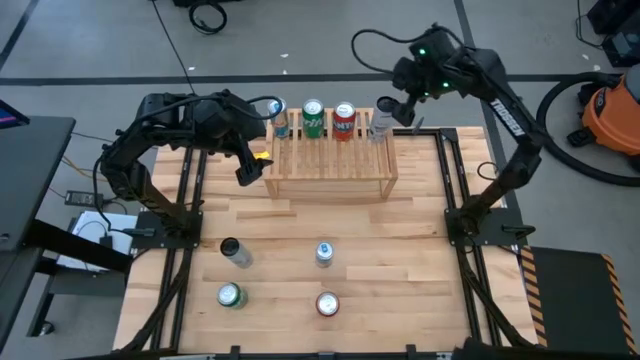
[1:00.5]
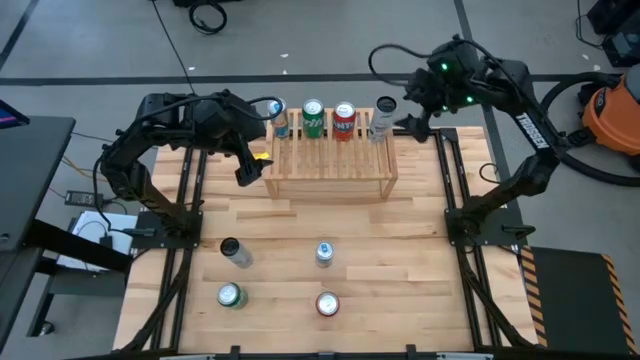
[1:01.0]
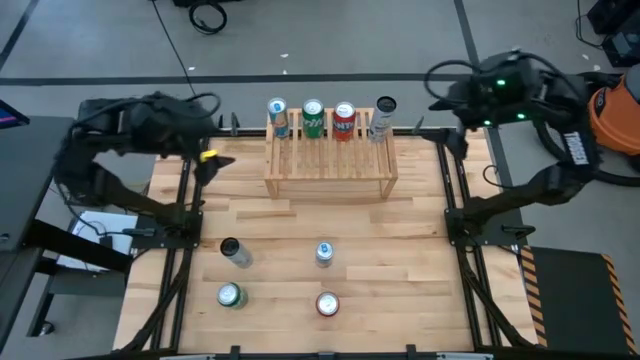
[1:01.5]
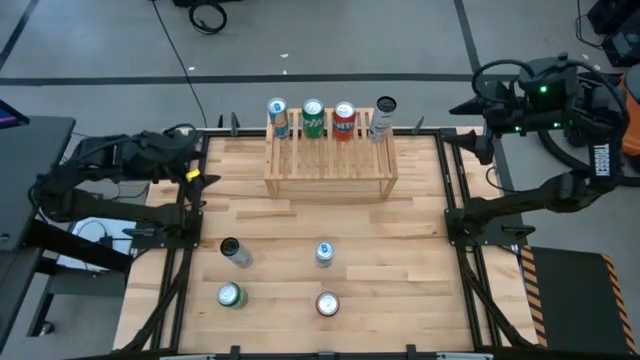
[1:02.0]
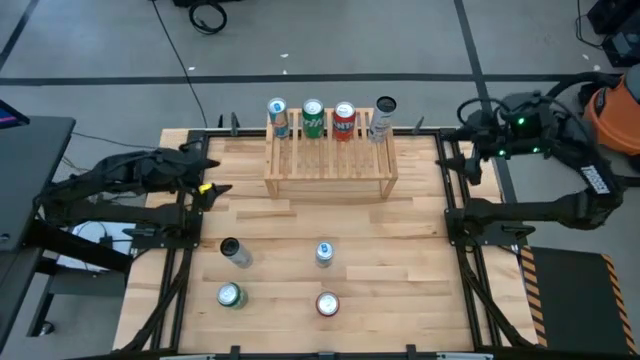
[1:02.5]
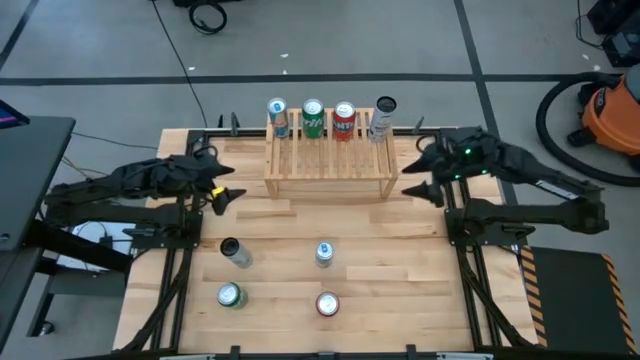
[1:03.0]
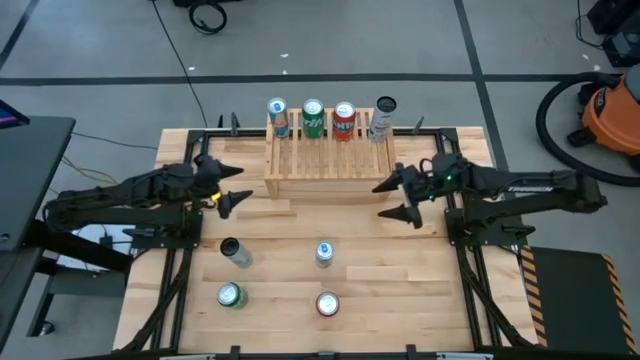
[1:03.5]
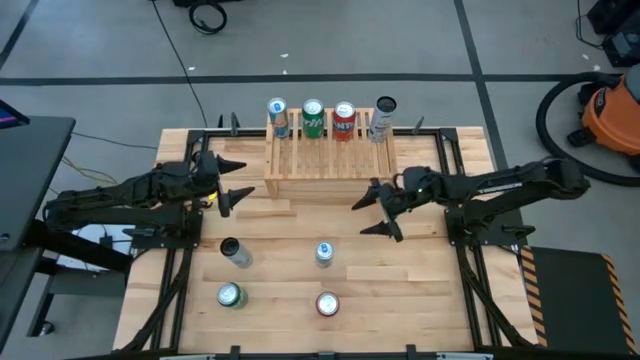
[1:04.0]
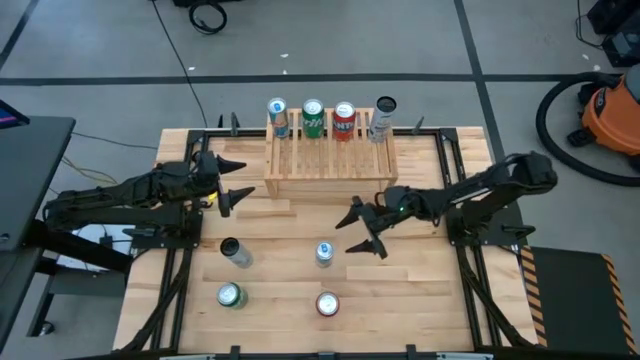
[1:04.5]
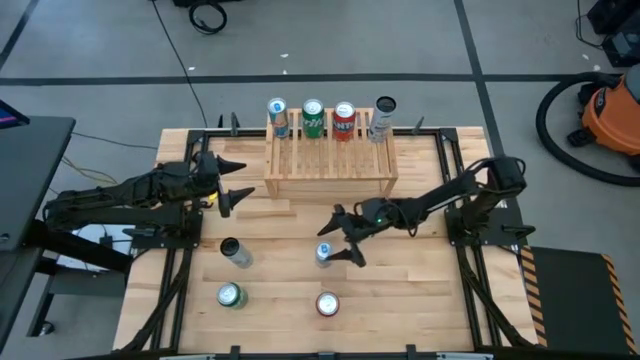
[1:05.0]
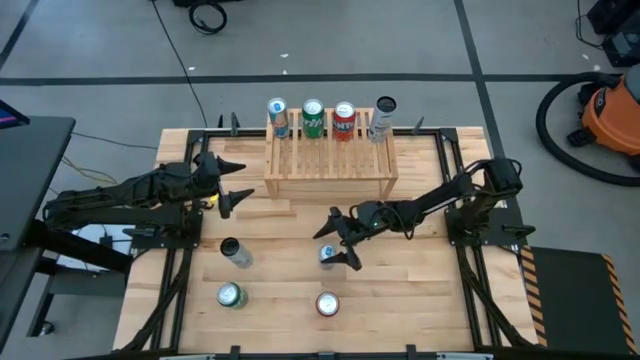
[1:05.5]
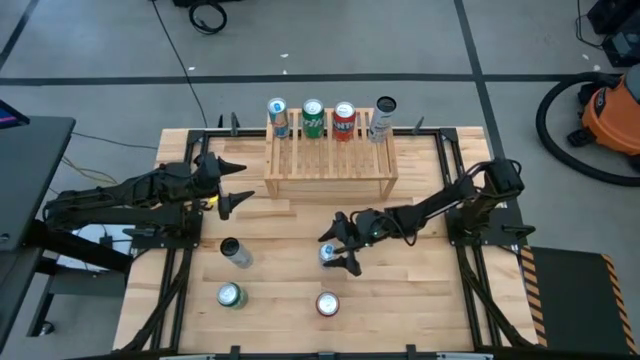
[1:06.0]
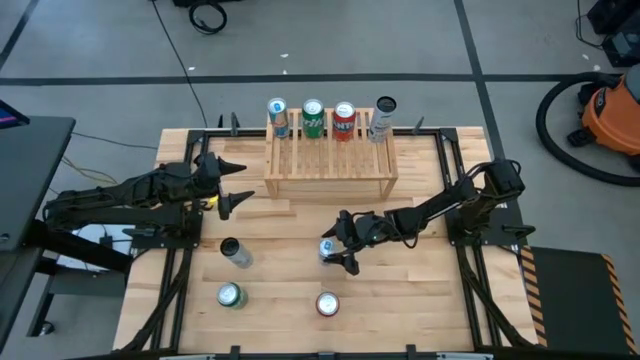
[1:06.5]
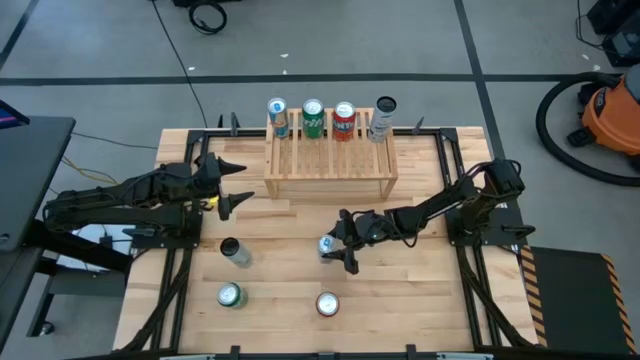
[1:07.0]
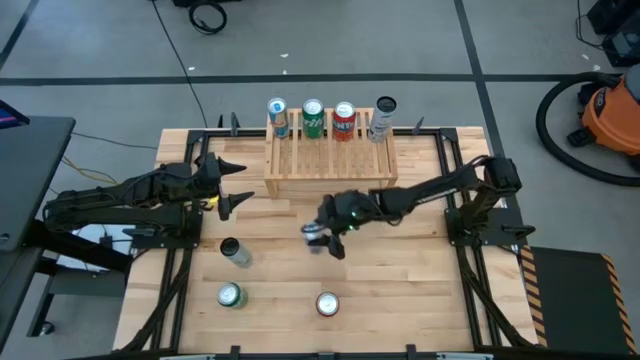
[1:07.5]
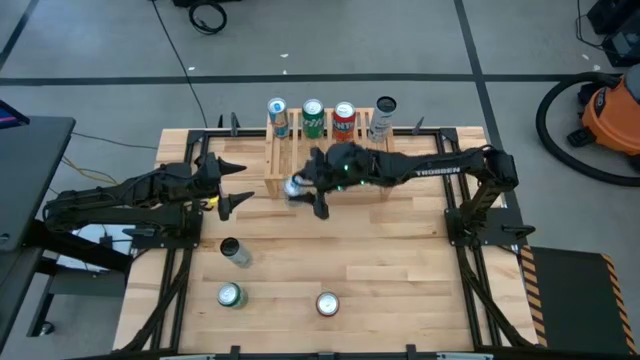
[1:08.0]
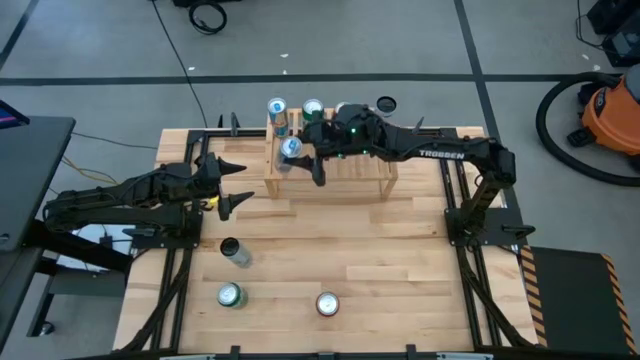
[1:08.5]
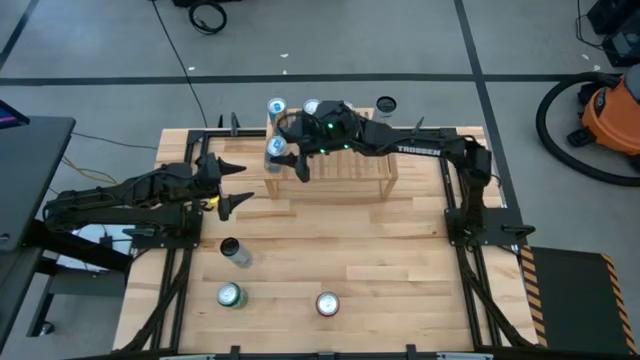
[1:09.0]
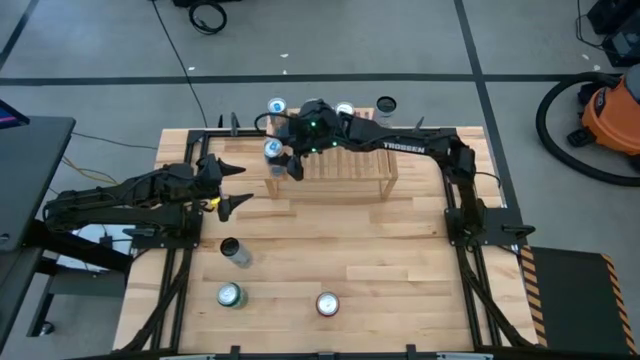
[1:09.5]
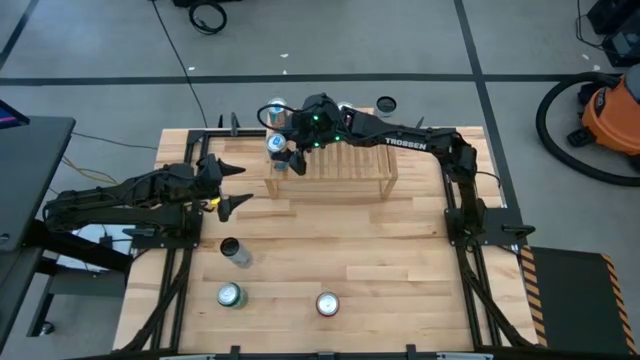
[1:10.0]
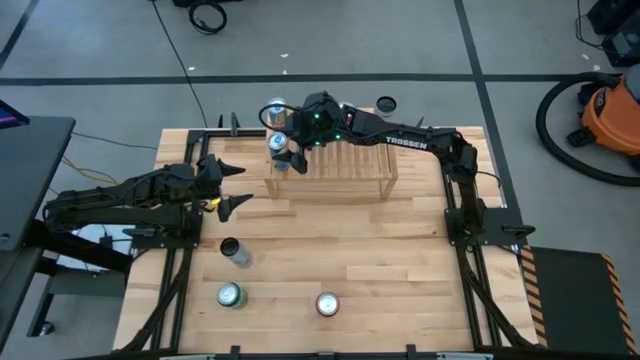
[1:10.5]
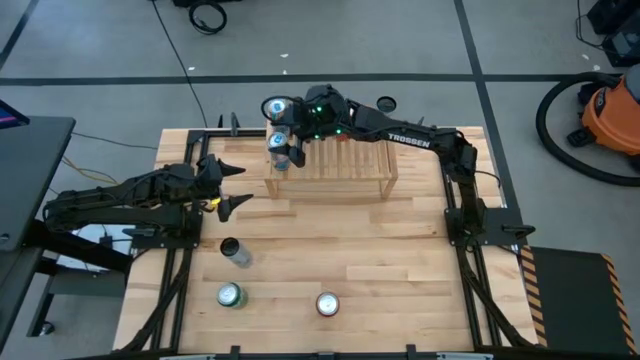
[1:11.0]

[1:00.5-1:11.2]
Task: Place canned beverage on shelf
Put the blue soda can on the shelf aligned with the other blue soda can

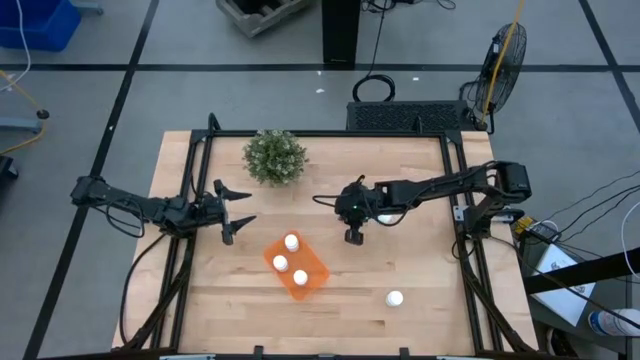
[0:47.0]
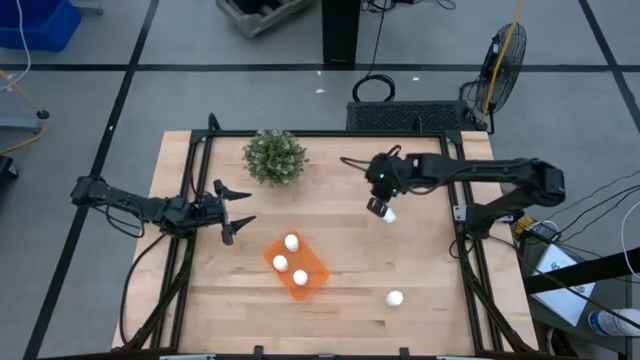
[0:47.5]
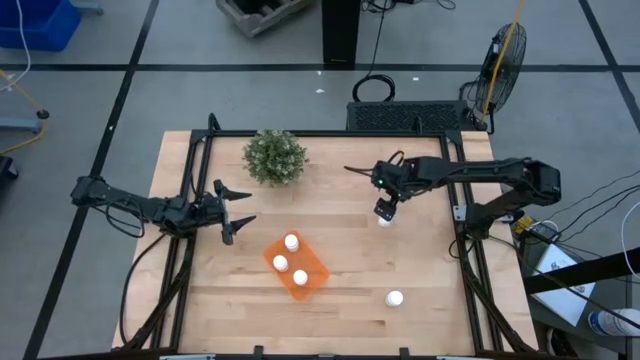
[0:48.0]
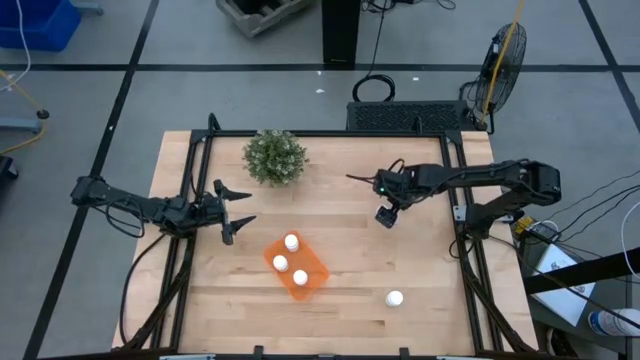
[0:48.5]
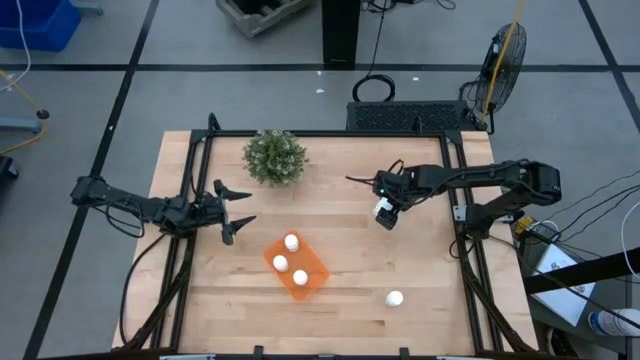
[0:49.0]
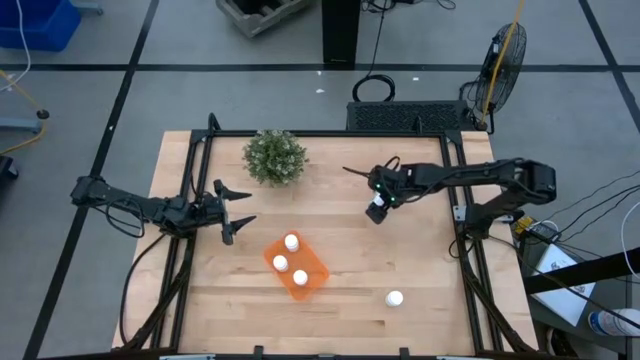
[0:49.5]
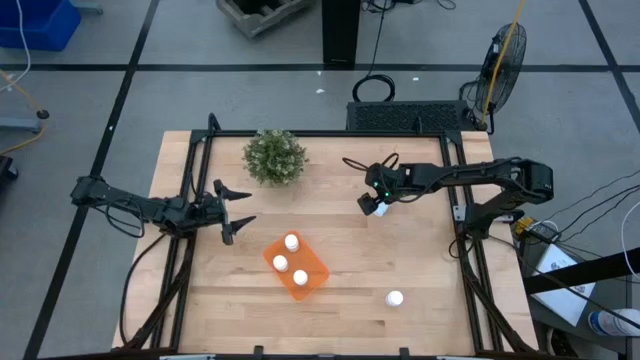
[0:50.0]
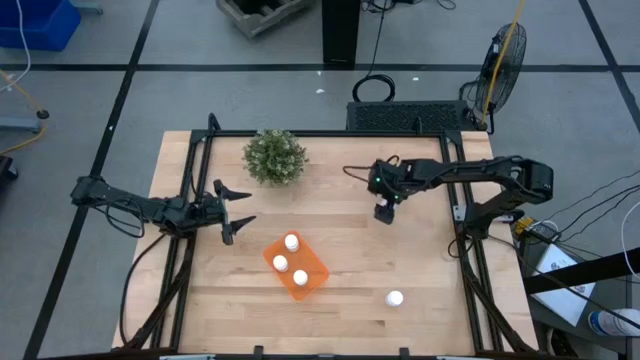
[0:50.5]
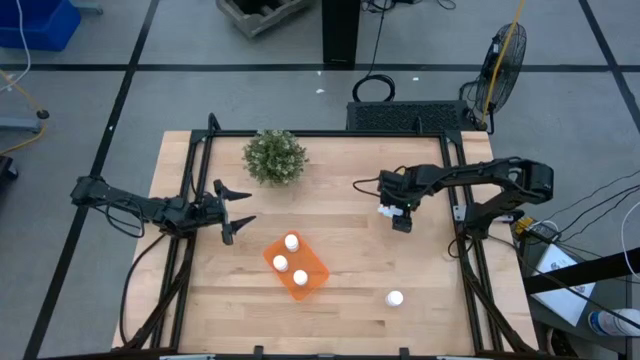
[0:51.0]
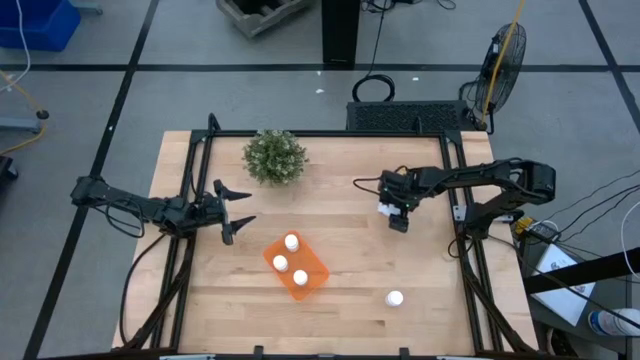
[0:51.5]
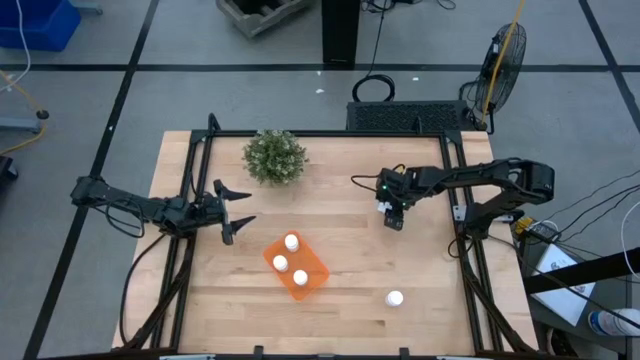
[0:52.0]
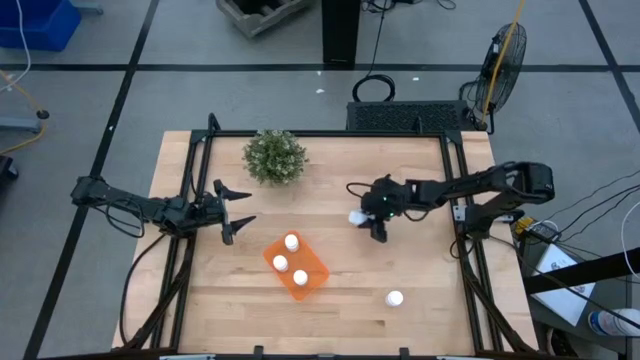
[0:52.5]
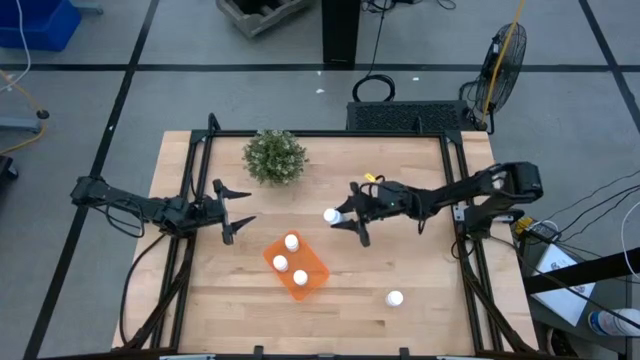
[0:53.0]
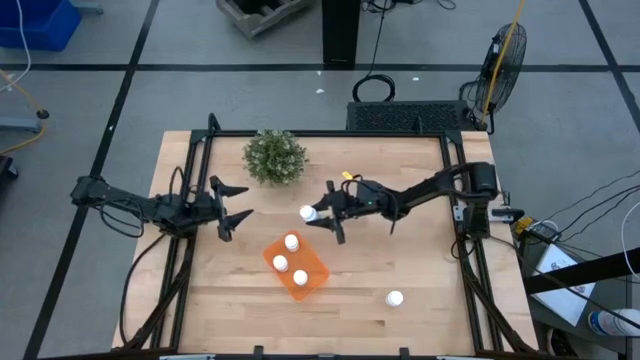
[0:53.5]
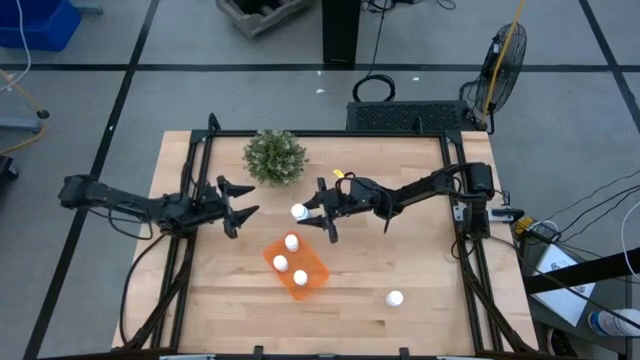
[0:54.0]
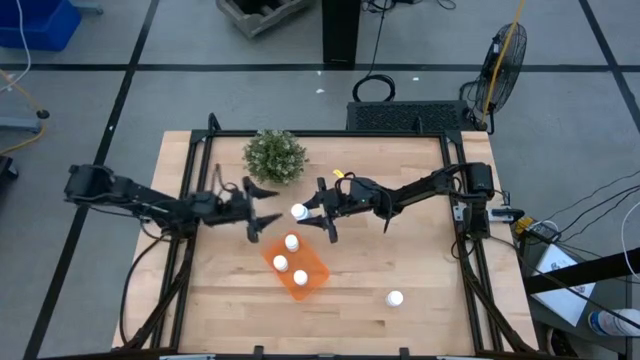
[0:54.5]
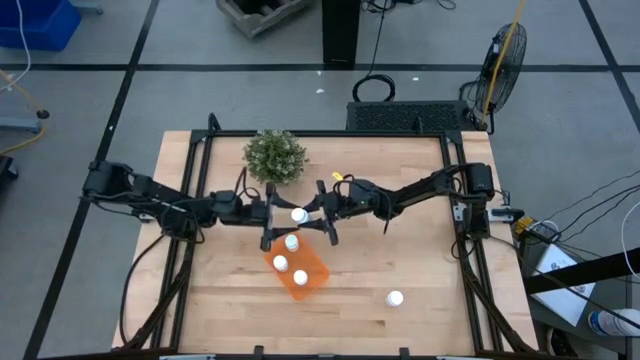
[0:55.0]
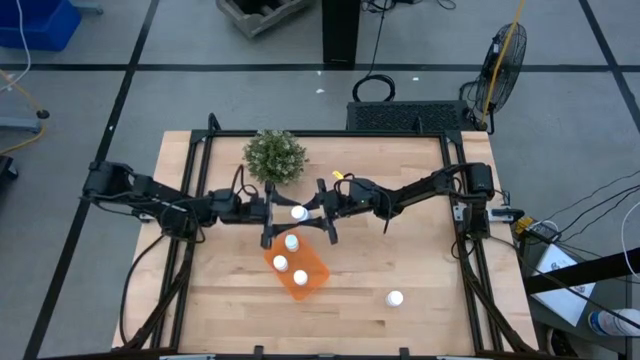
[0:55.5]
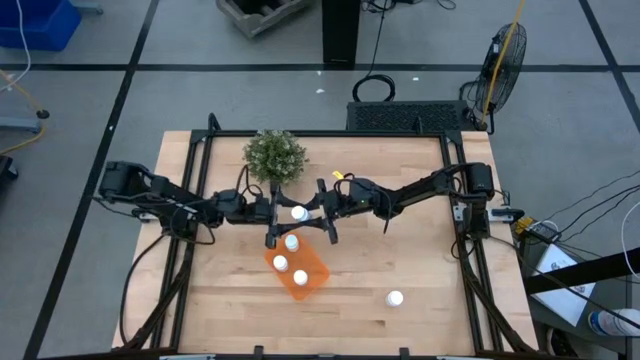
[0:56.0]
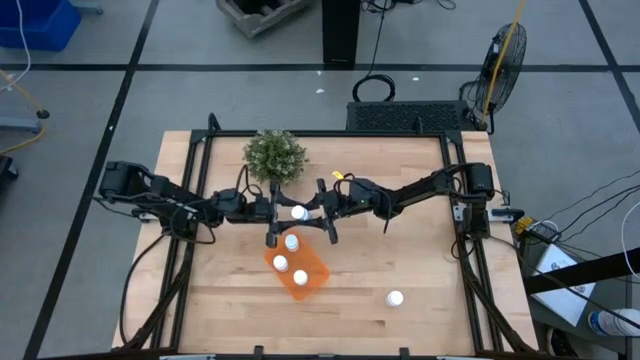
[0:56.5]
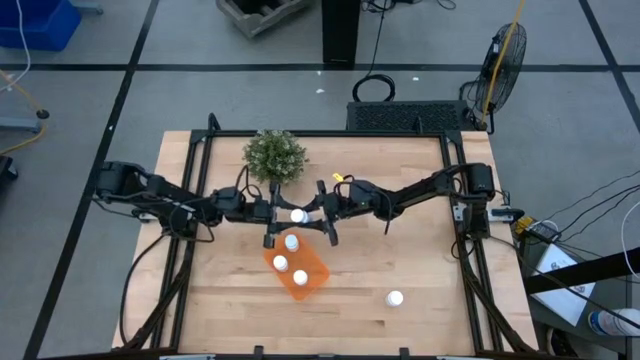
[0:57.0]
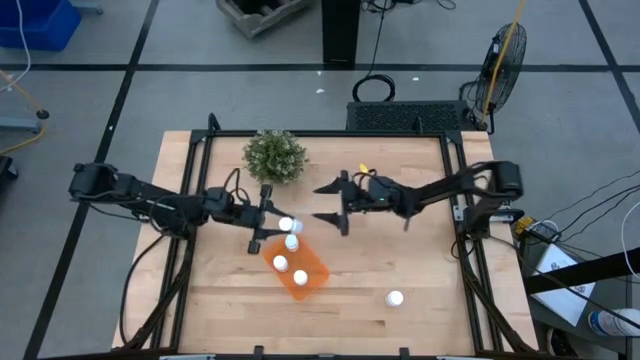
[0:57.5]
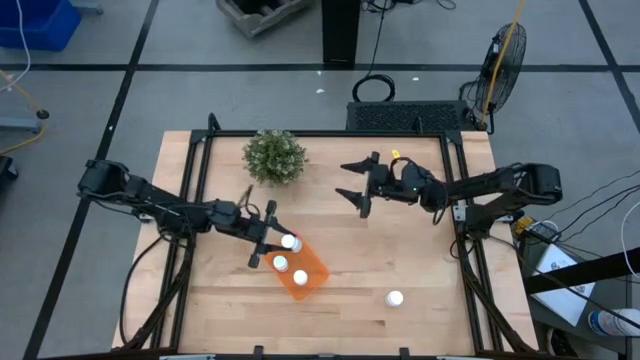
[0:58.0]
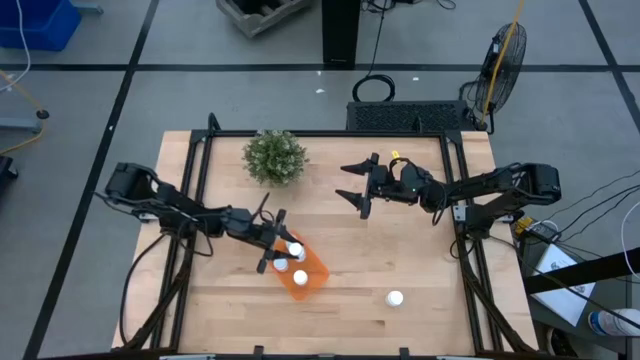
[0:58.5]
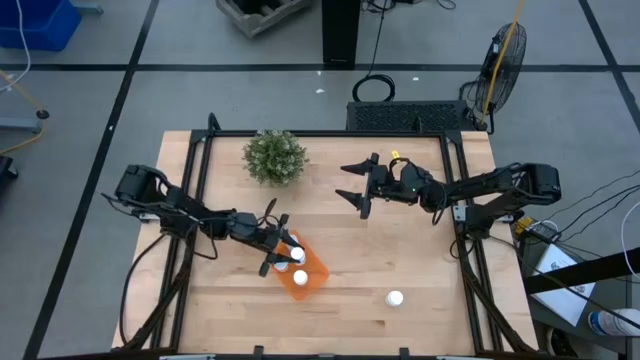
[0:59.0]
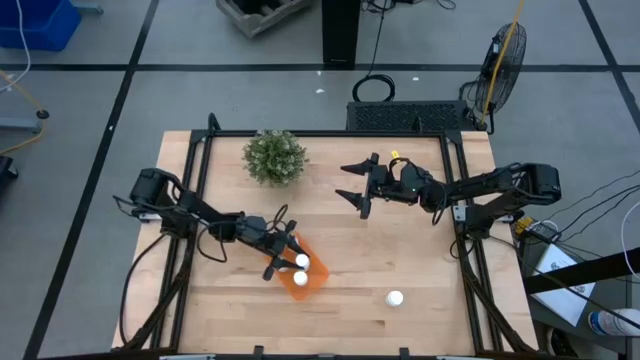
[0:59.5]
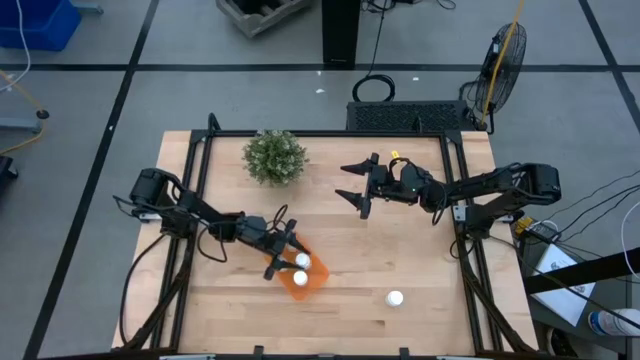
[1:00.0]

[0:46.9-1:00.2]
Task: Pick and place pill bottles into a basket
Put the white medicine bottle into the orange bin
